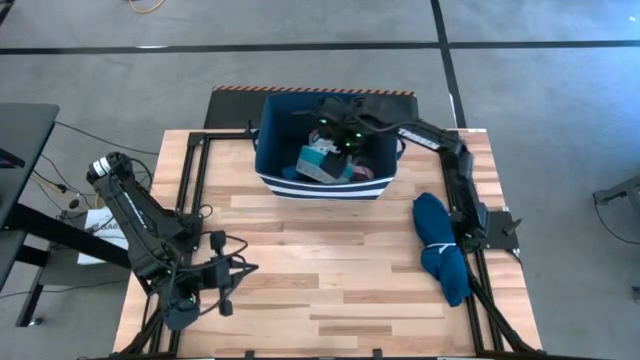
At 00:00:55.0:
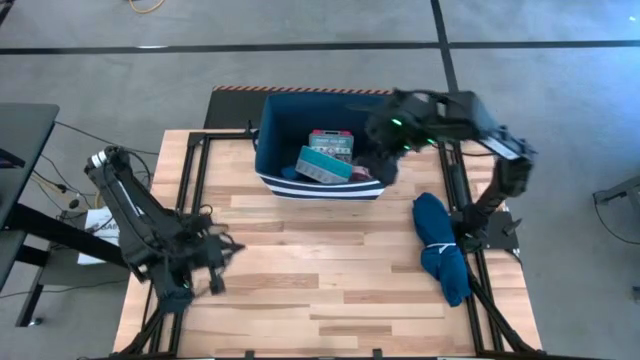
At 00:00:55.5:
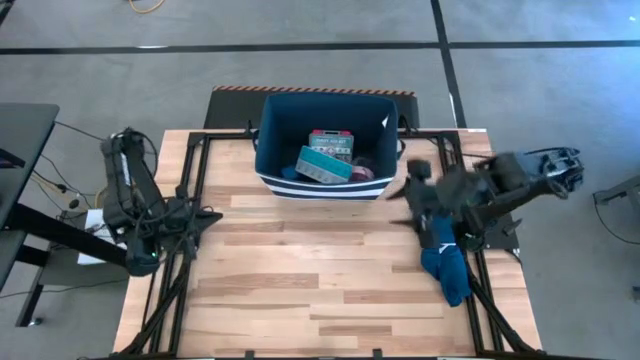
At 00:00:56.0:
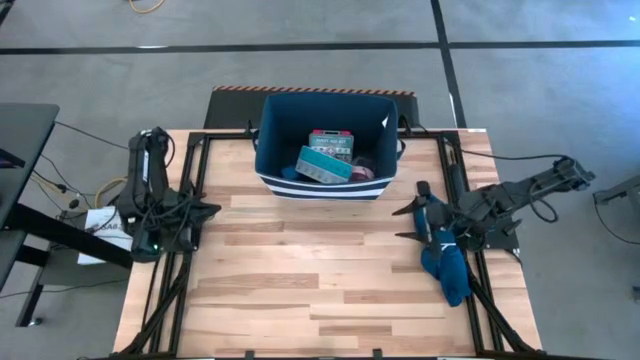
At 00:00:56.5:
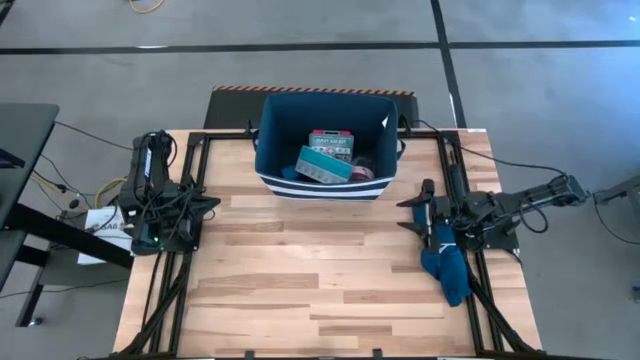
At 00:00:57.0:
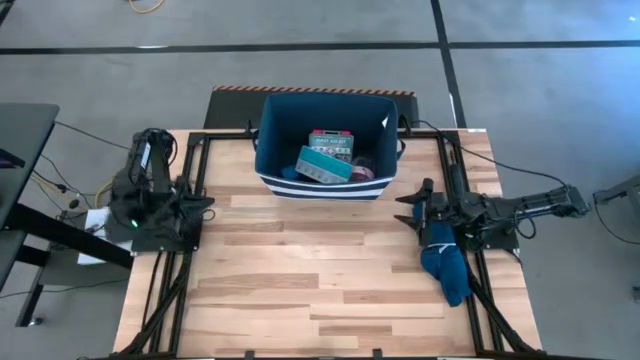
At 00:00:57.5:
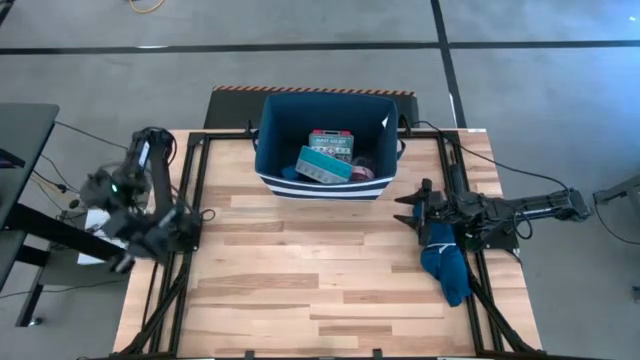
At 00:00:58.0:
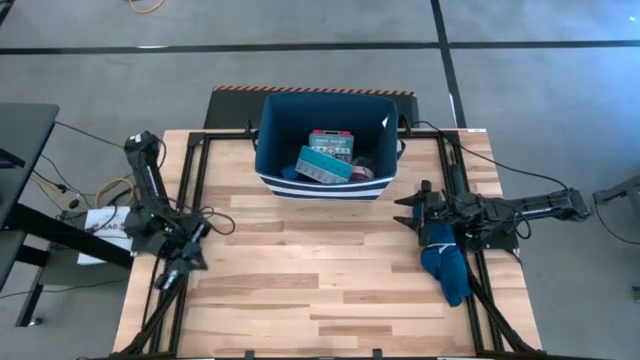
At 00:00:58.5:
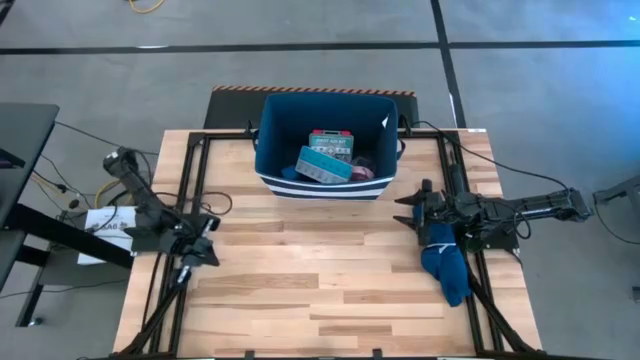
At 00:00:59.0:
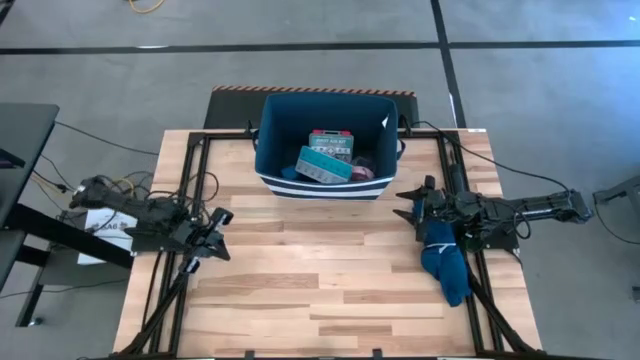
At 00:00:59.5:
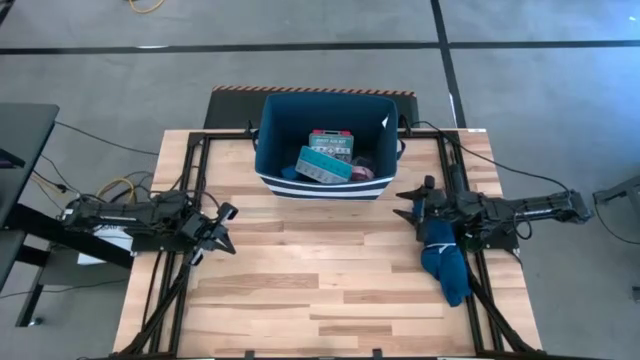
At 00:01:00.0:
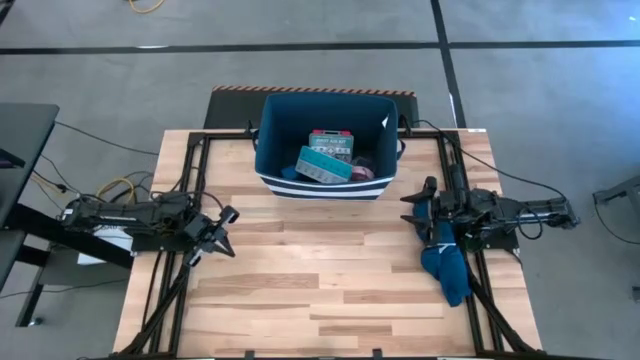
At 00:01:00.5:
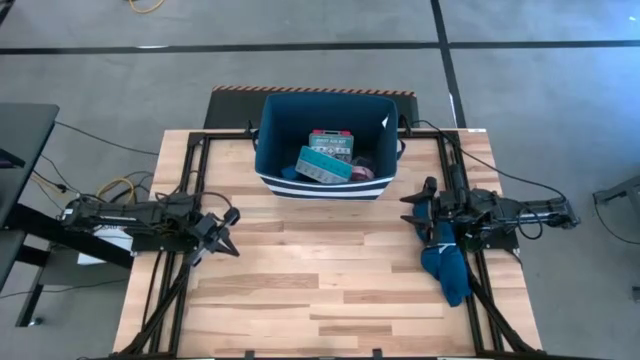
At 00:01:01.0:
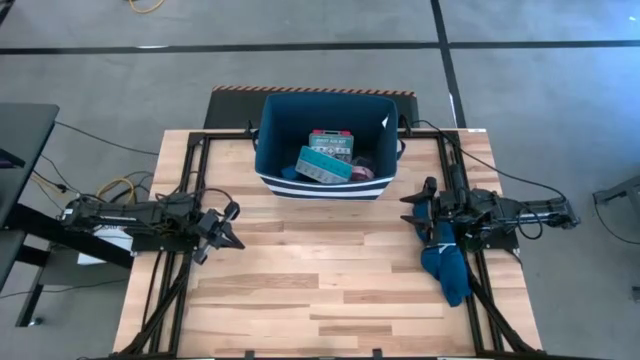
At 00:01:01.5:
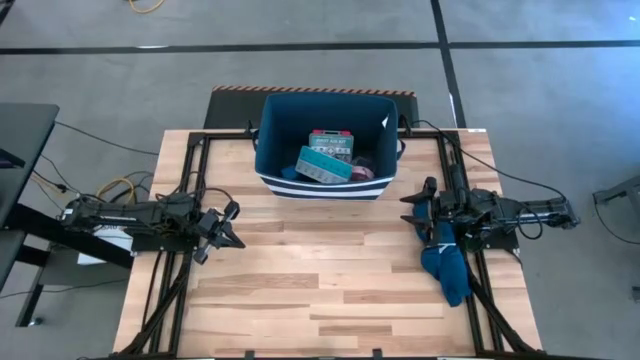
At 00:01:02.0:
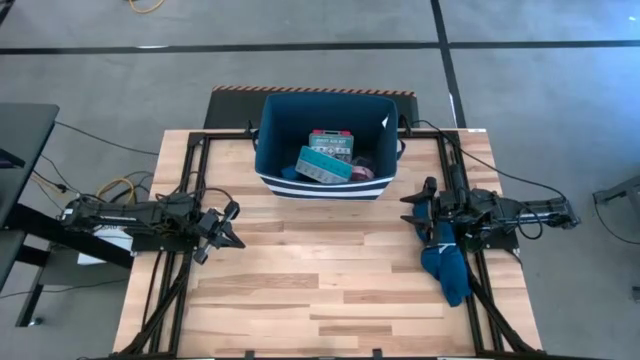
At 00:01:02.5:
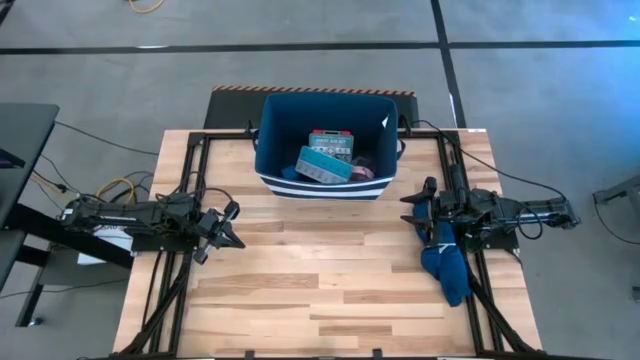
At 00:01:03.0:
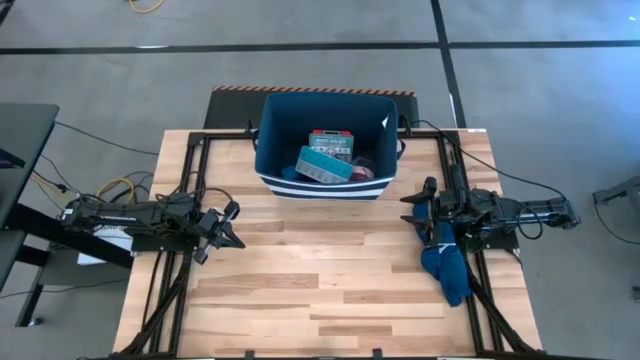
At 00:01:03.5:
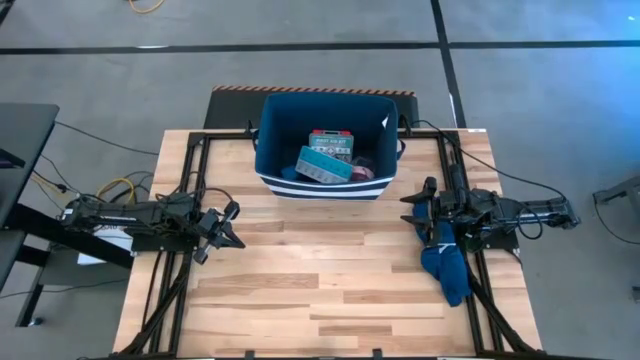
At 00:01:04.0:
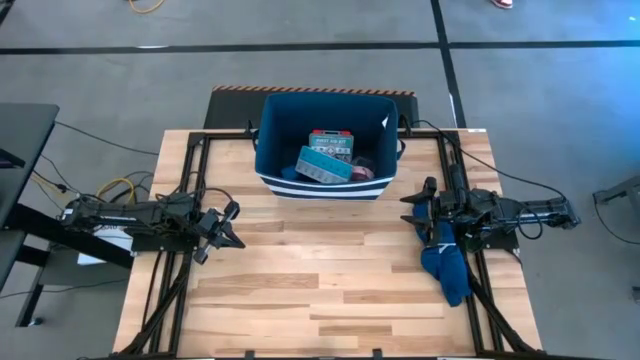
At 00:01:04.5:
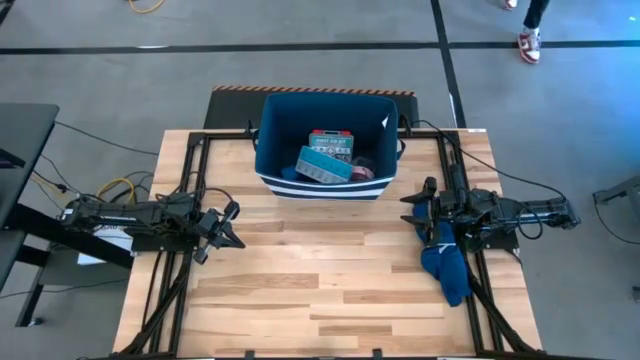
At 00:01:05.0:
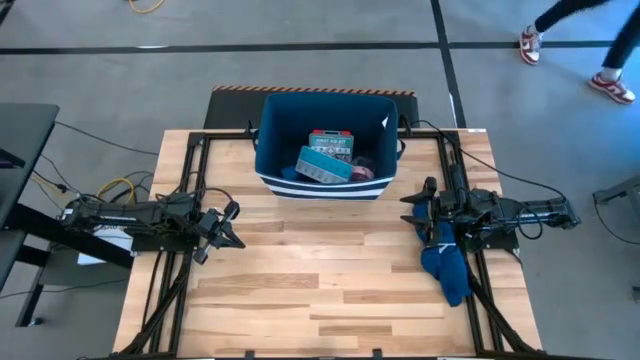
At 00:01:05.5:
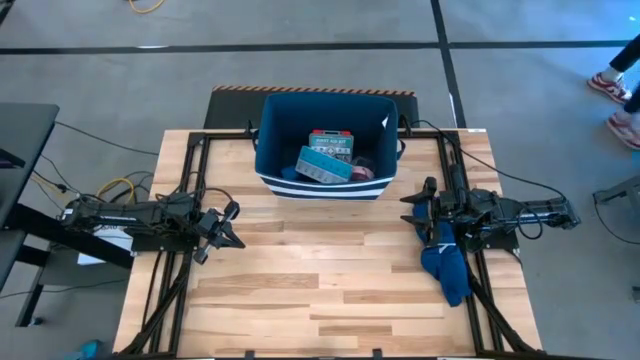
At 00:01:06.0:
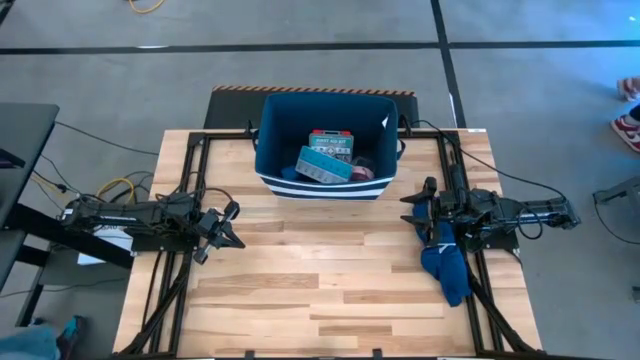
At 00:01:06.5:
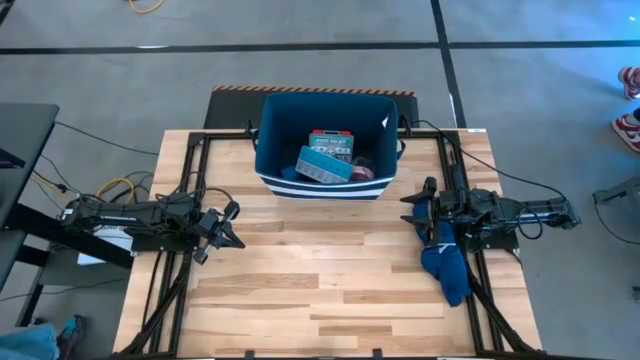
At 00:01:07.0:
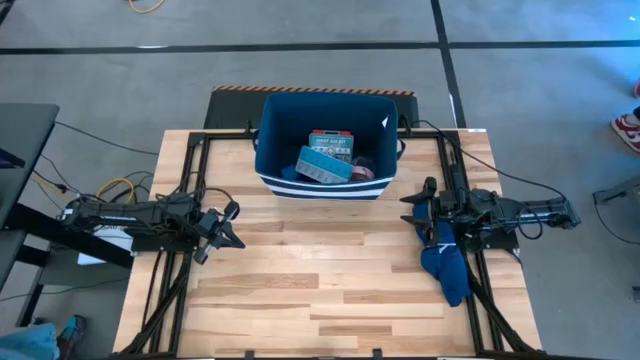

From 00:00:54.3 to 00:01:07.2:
Task: Pick & place medical supplies in basket/bin
Return to Home Position

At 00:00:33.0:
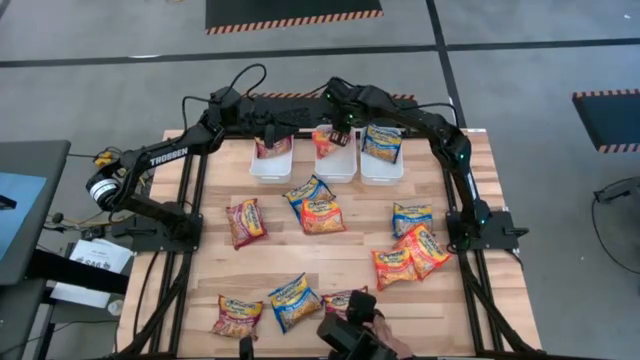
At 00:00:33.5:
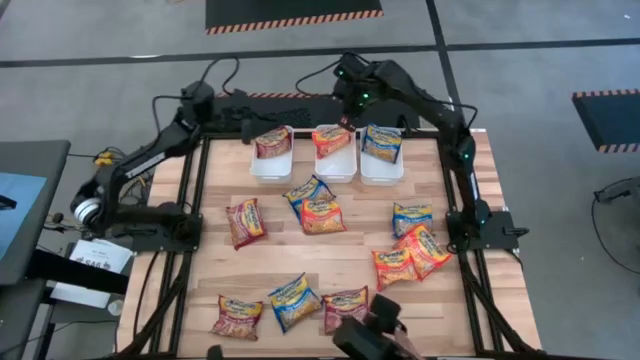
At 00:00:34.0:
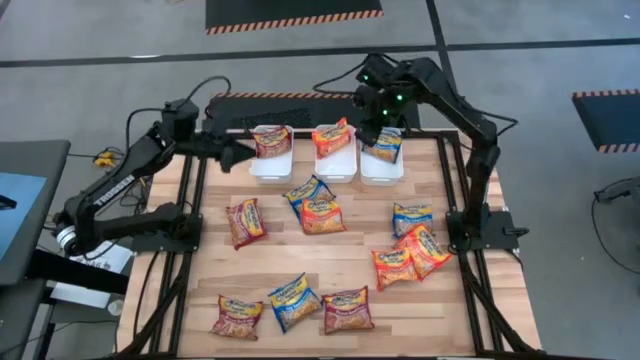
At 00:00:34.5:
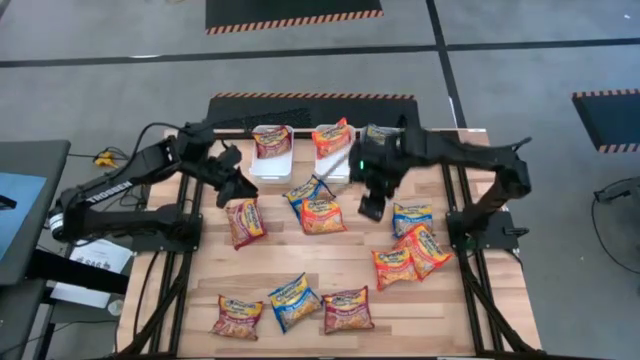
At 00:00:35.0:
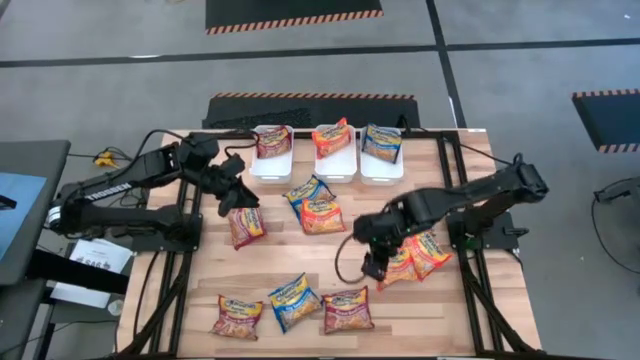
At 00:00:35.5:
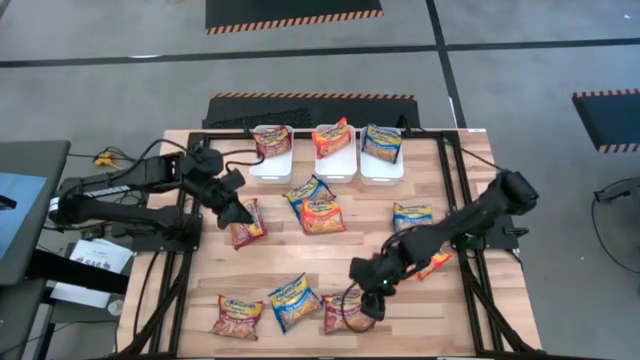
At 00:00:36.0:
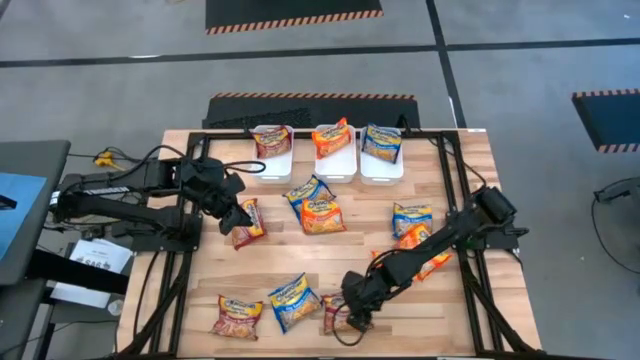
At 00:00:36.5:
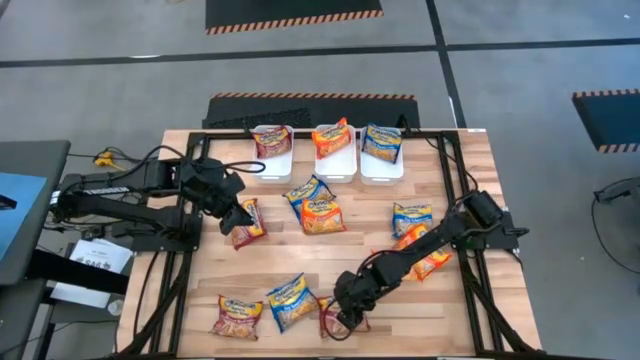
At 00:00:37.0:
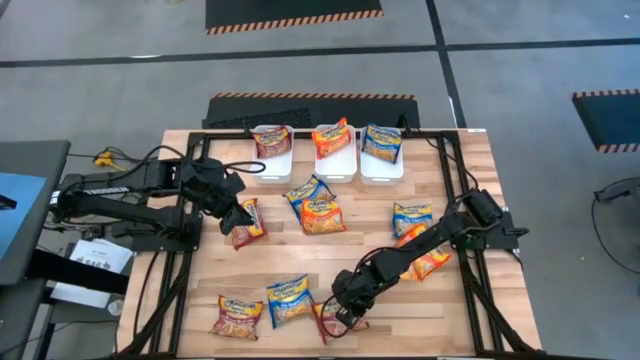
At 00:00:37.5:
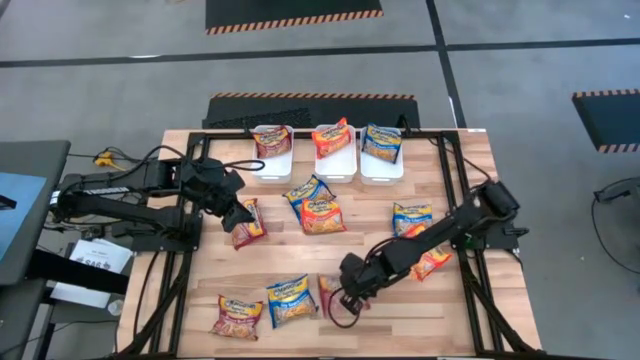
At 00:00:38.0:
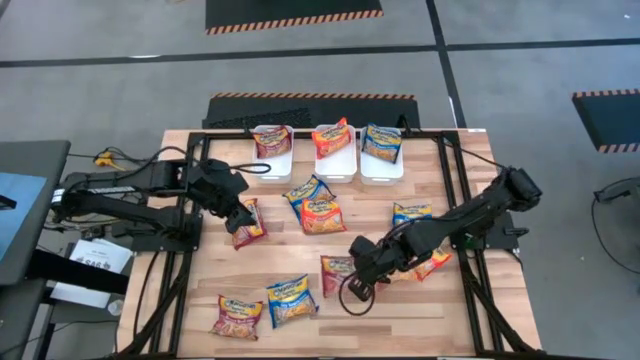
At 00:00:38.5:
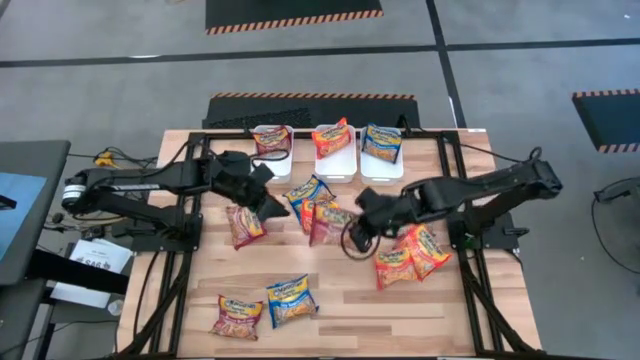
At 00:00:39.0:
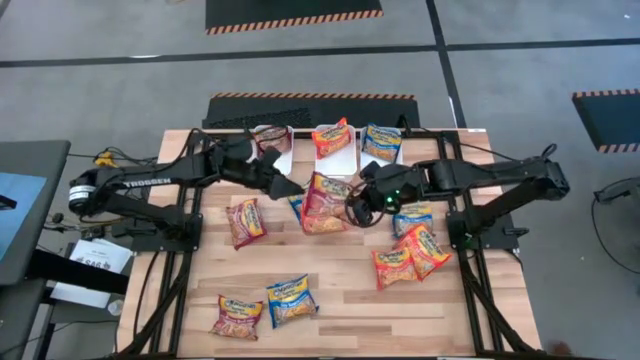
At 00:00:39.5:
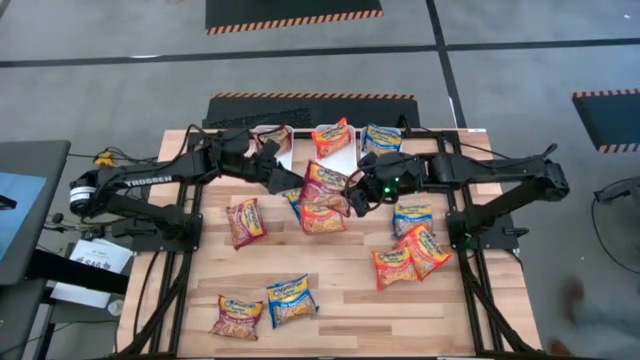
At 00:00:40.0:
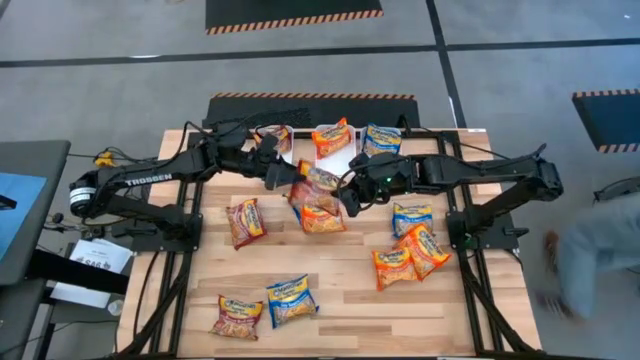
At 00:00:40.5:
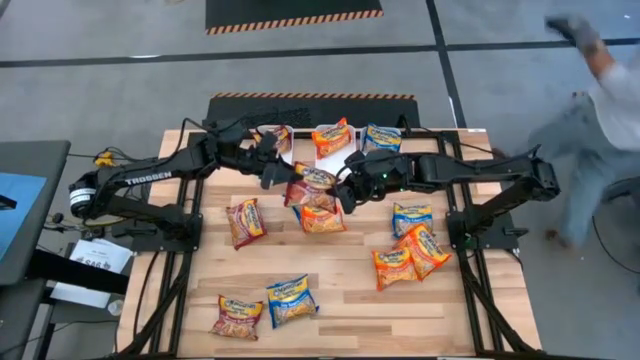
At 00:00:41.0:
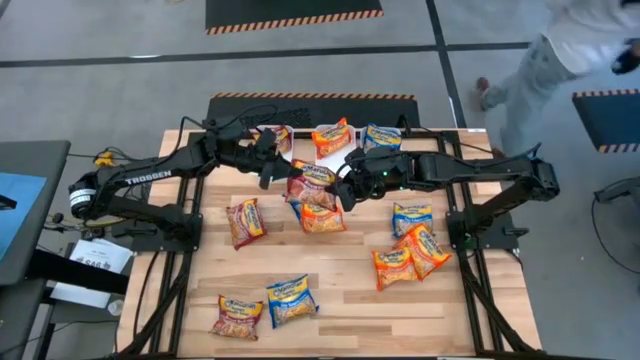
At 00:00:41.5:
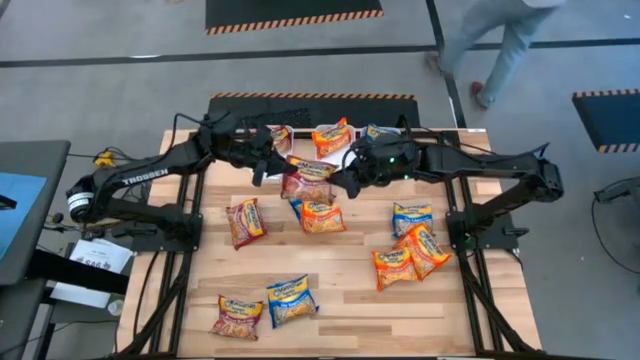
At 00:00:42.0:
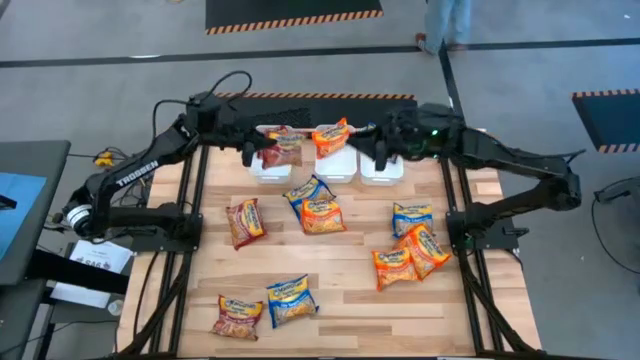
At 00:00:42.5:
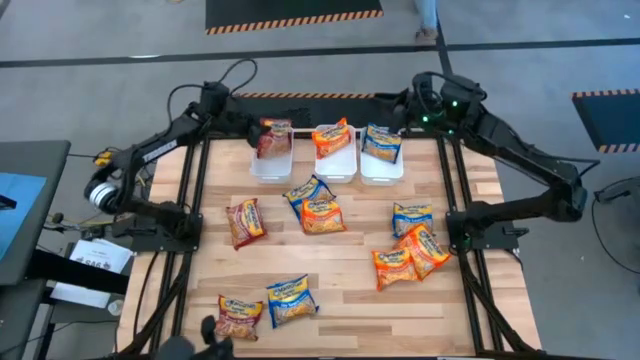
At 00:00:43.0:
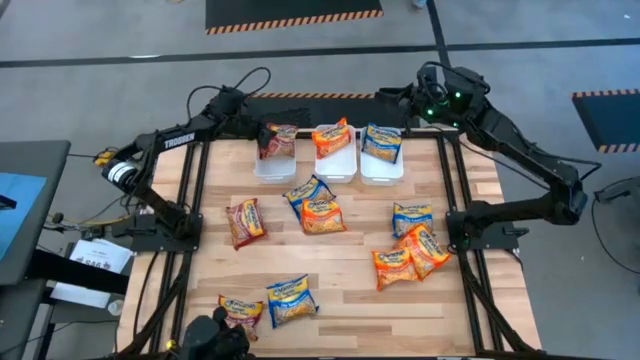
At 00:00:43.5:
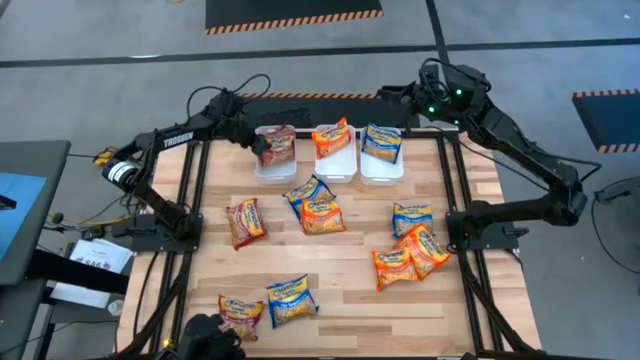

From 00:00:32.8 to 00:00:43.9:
Task: Sort Maruchan noodles
Put the red noodle pack into the left white bin
